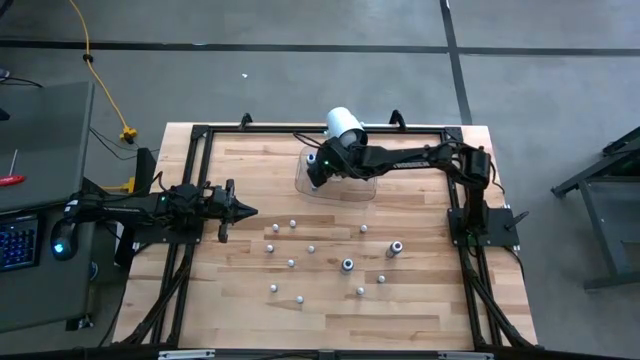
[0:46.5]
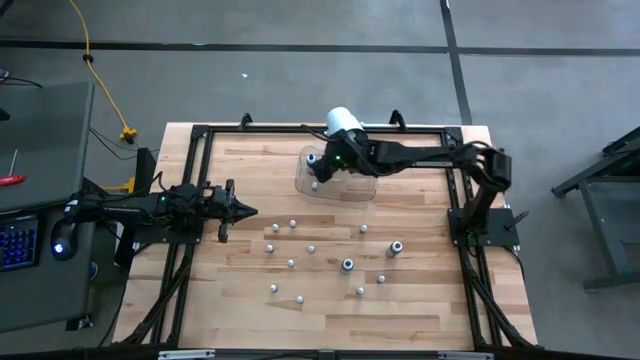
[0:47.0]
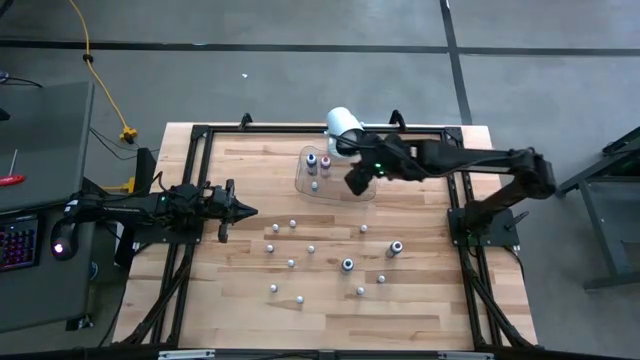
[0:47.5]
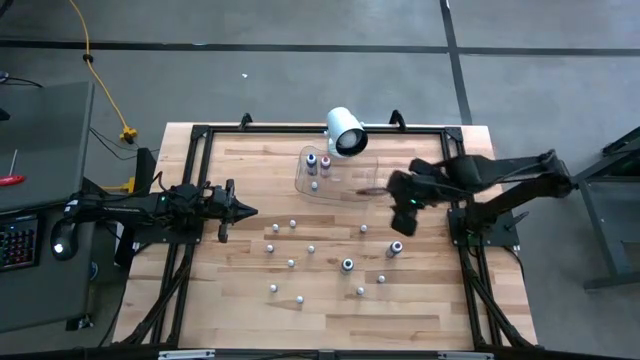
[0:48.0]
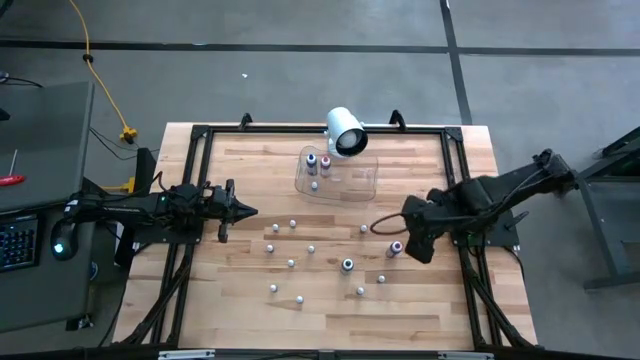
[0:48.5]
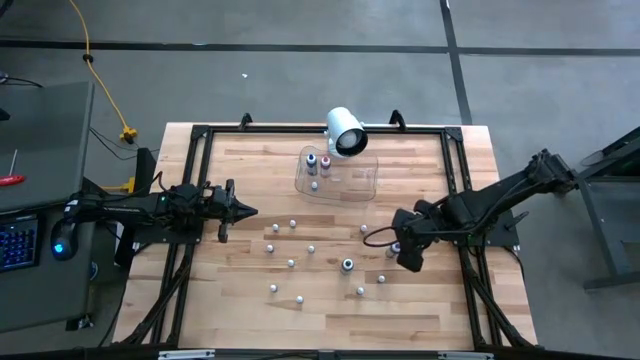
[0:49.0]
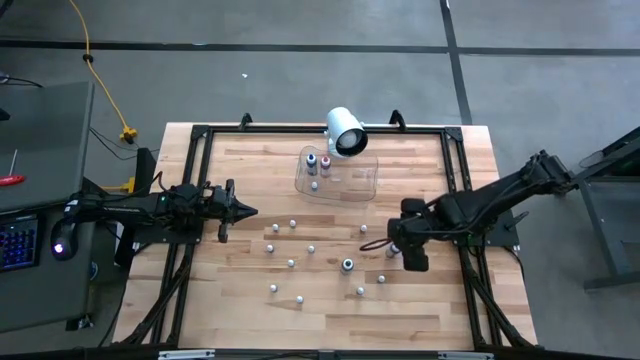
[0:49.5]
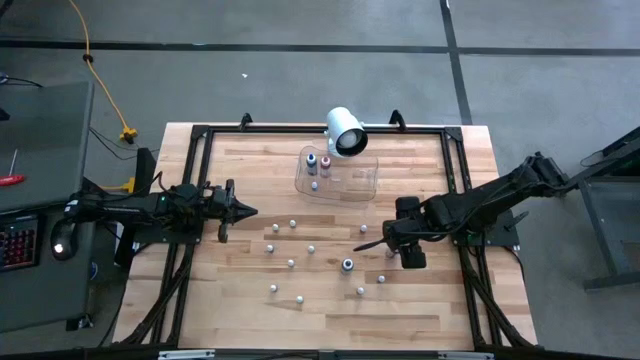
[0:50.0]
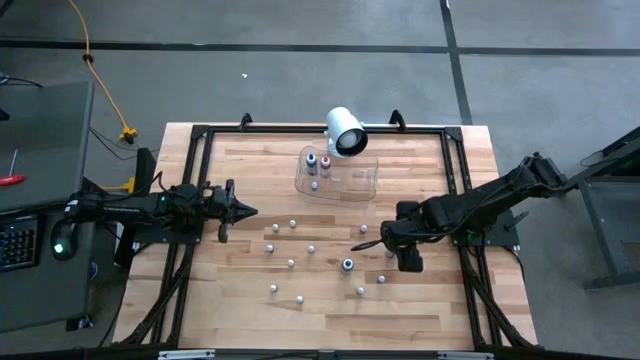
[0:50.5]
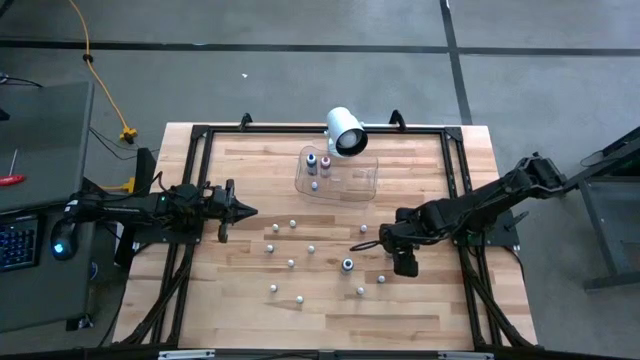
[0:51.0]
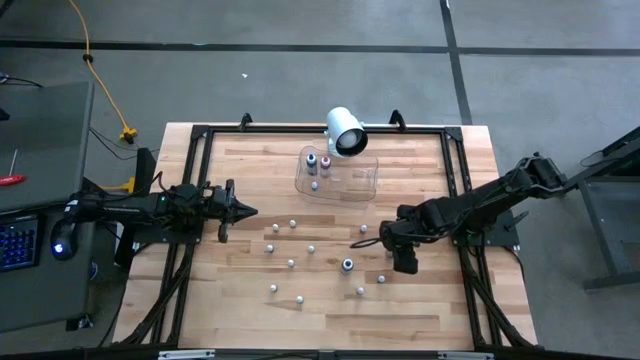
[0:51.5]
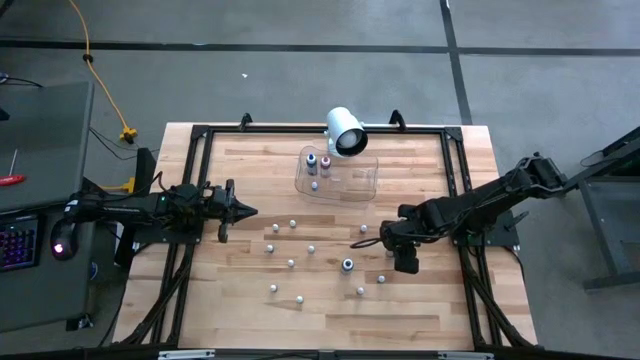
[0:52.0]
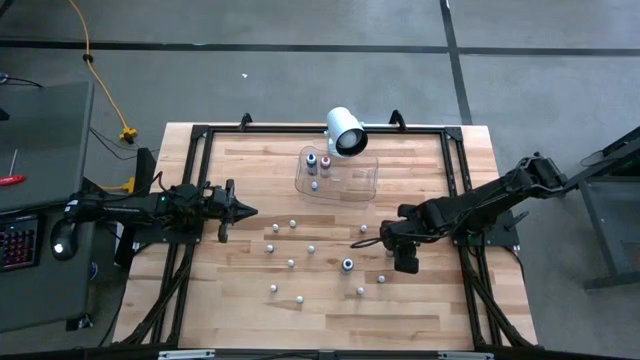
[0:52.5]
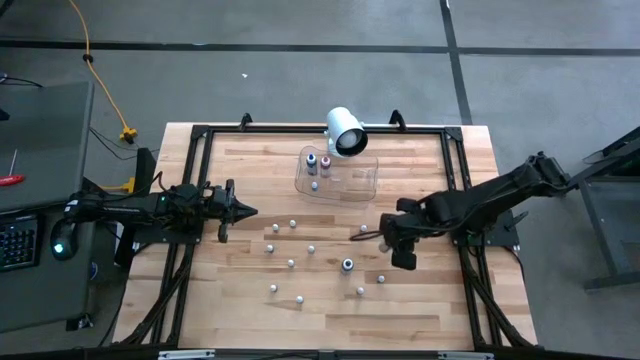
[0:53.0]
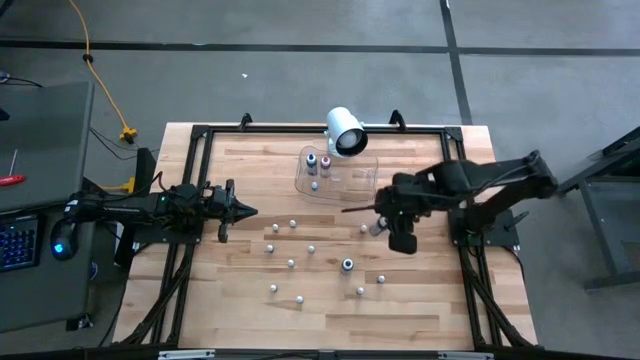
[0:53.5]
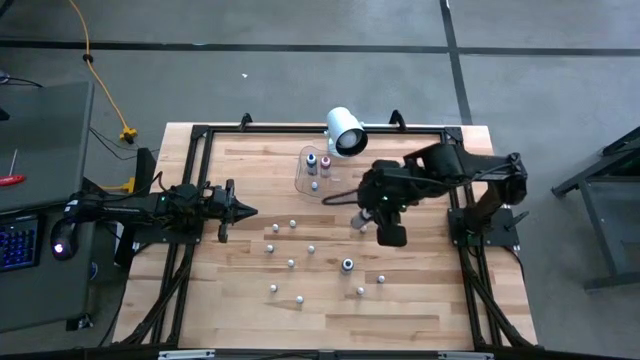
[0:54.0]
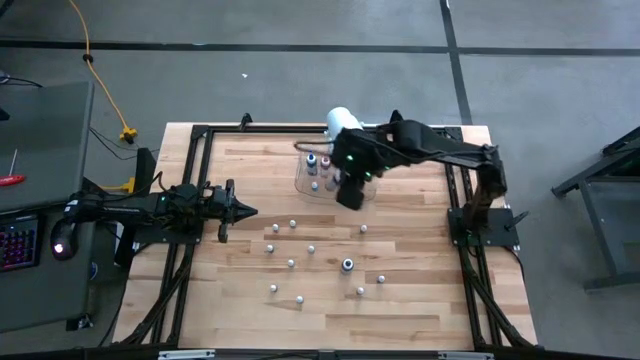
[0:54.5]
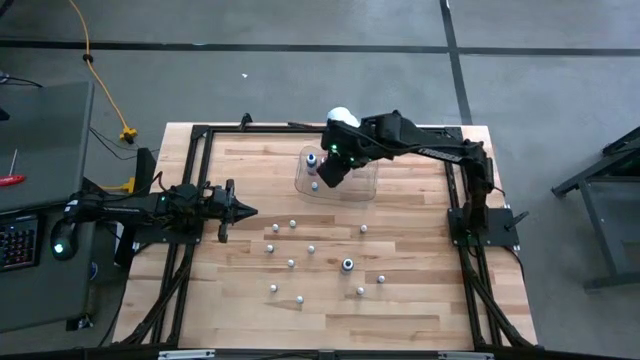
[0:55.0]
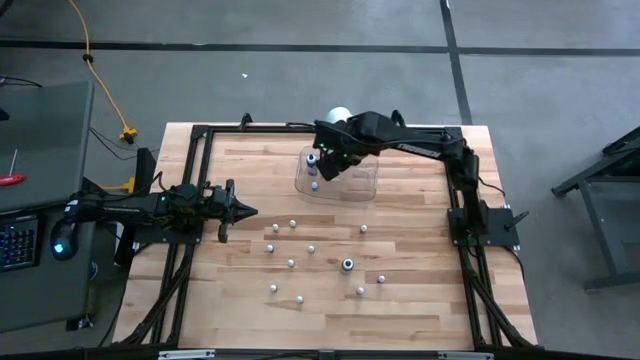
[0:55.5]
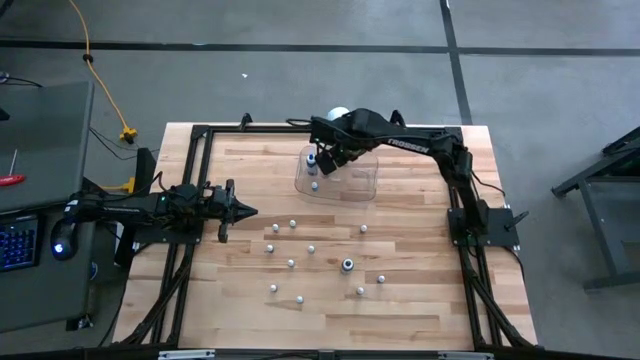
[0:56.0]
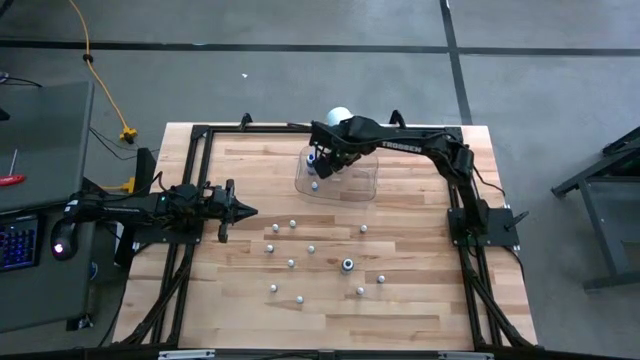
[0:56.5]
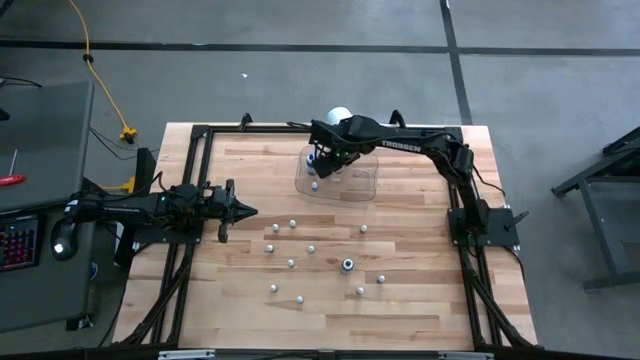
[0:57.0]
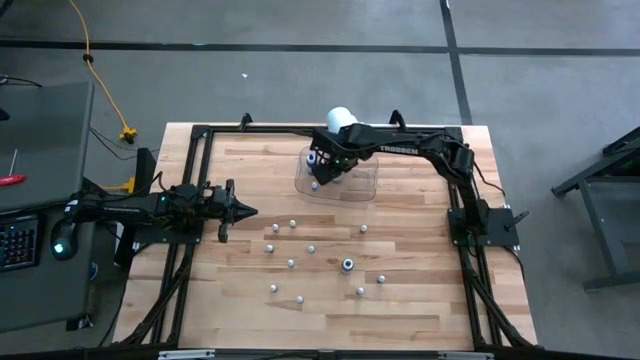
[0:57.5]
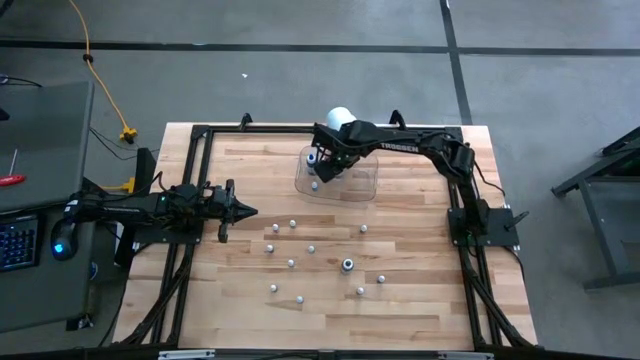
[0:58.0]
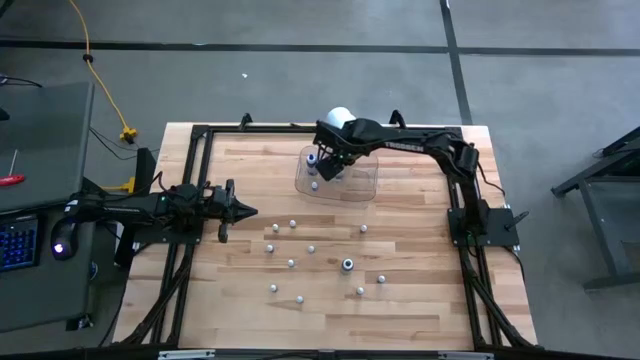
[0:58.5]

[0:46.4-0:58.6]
Task: Pick & Place food coloring
Put the large purple food coloring bottle into the transparent bin

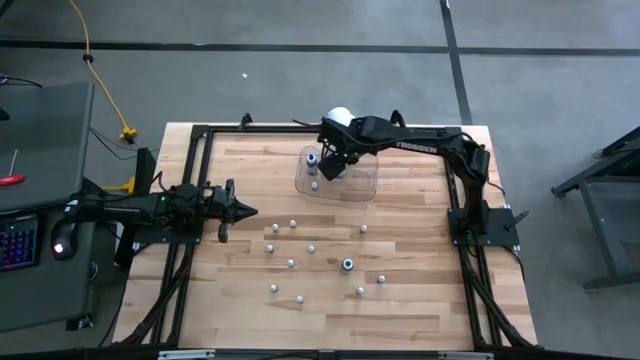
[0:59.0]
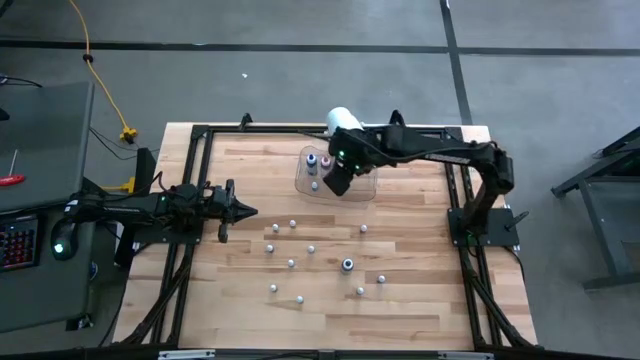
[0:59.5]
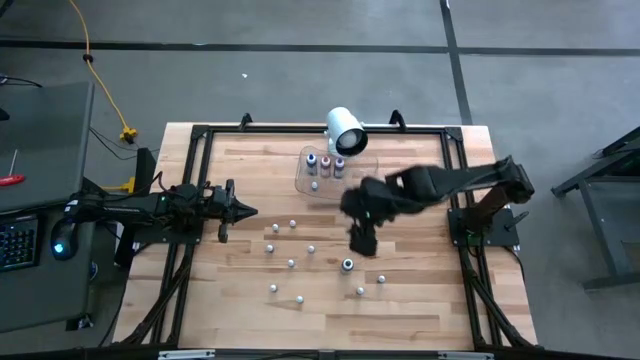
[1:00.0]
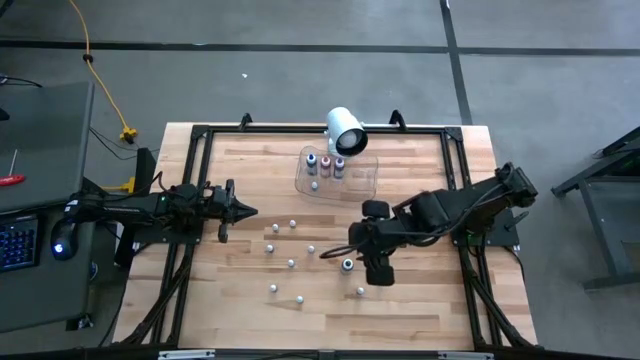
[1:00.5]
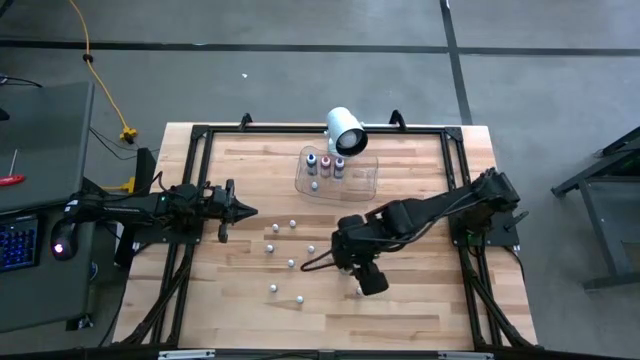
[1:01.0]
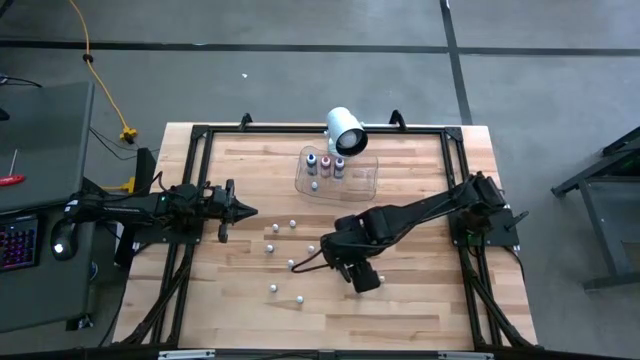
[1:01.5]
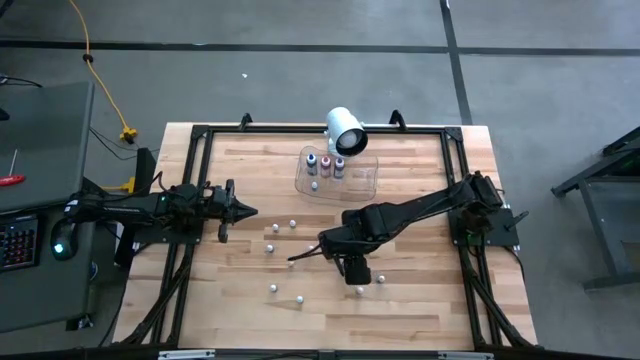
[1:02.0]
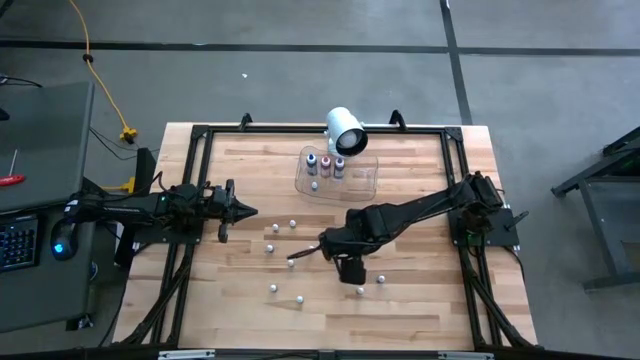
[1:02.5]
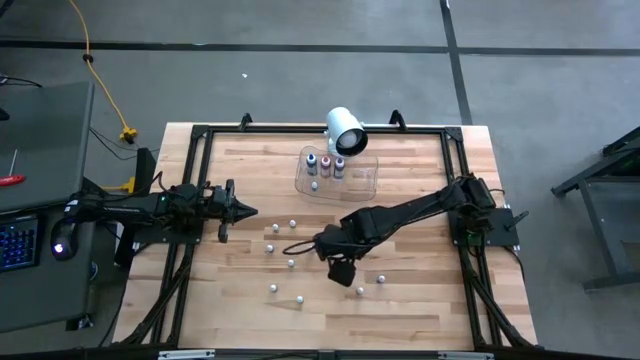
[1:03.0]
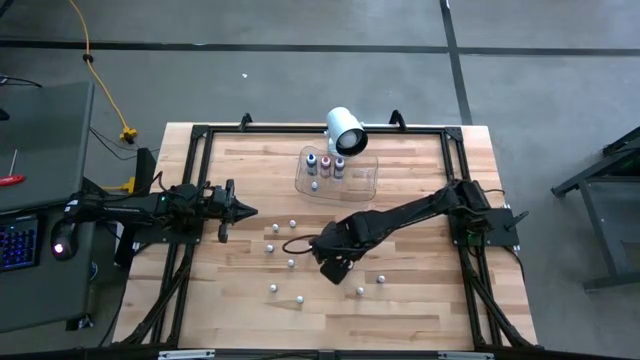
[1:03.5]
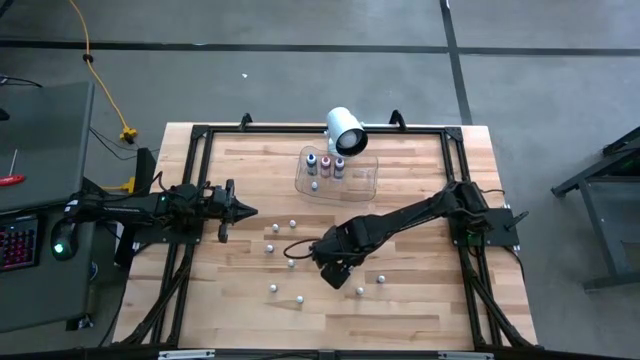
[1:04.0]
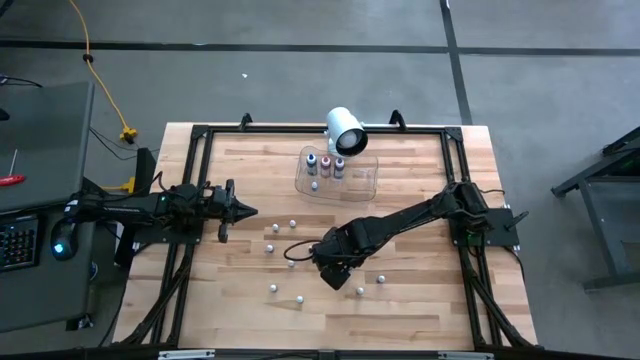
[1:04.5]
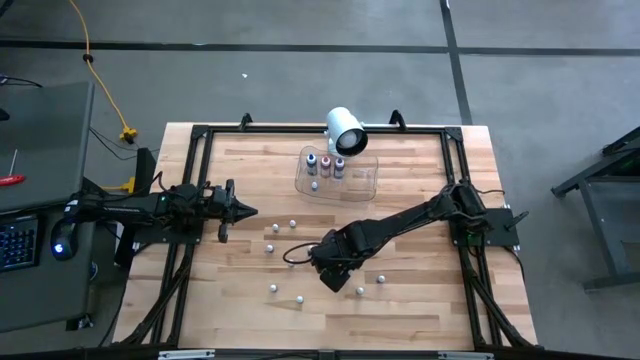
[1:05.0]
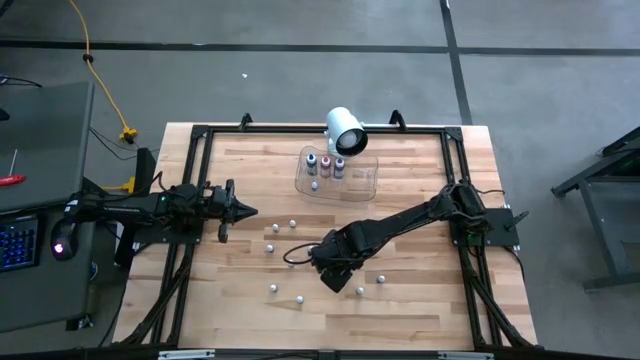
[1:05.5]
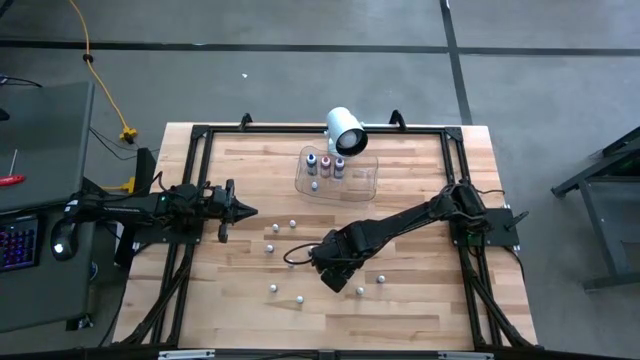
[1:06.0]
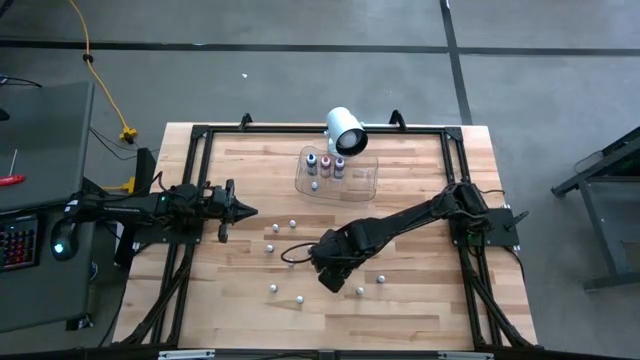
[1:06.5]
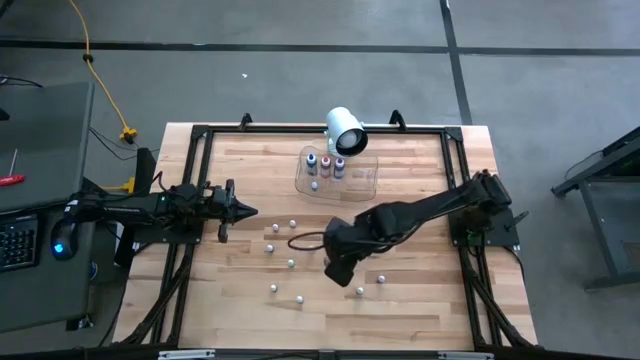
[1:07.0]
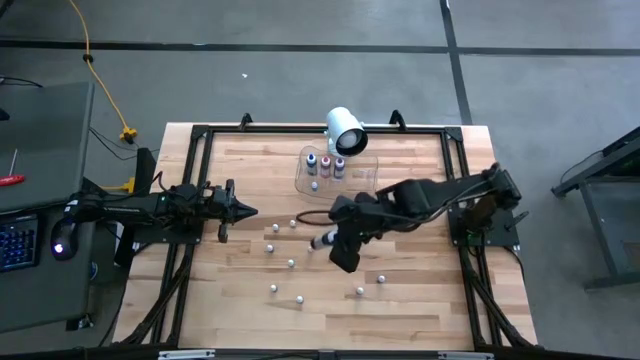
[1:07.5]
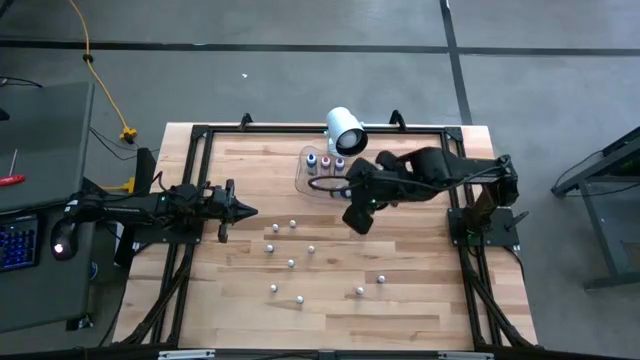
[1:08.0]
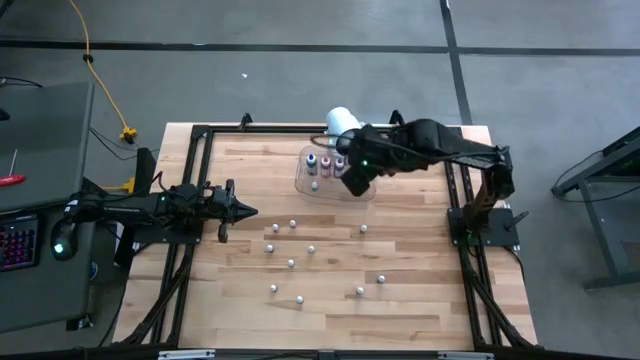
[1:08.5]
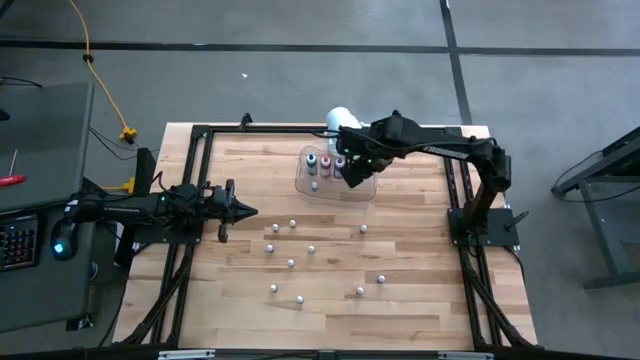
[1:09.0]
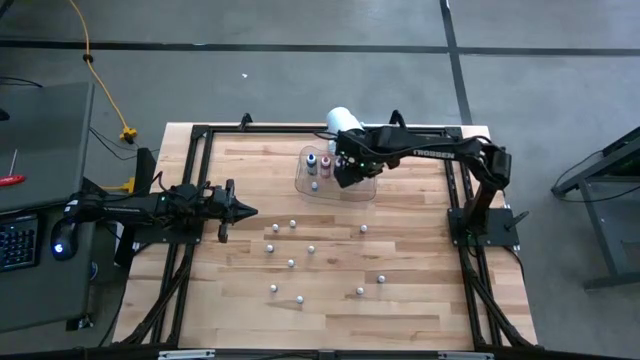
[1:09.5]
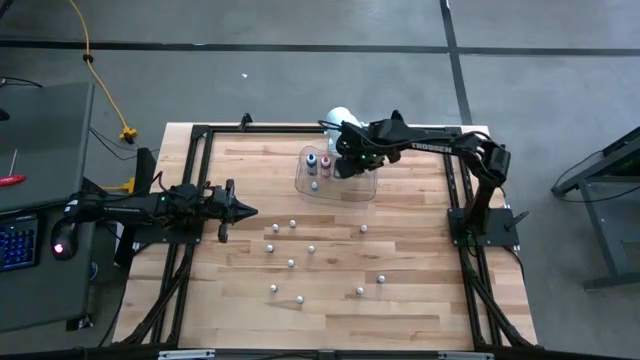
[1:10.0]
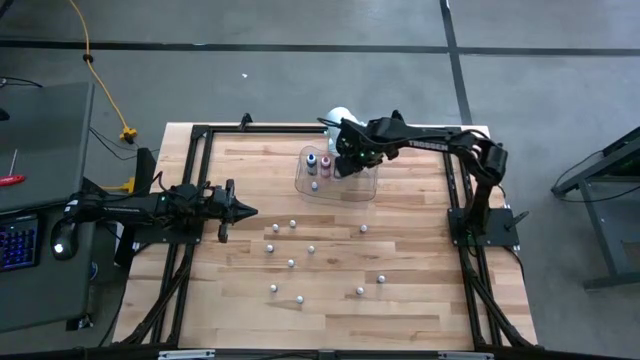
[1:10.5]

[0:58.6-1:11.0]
Put the large black food coloring bottle into the transparent bin
